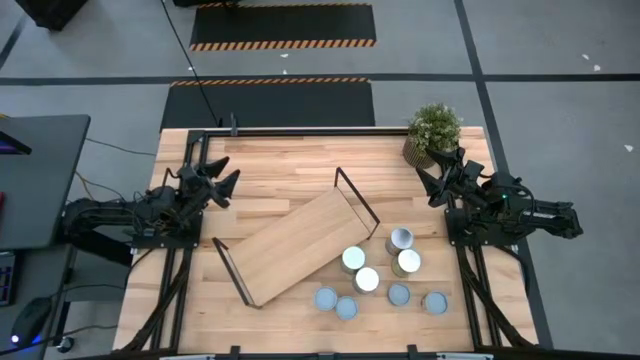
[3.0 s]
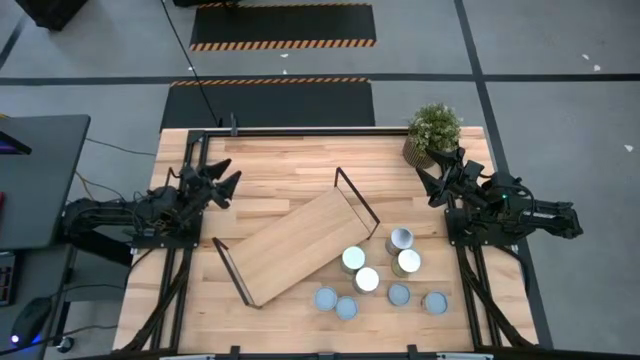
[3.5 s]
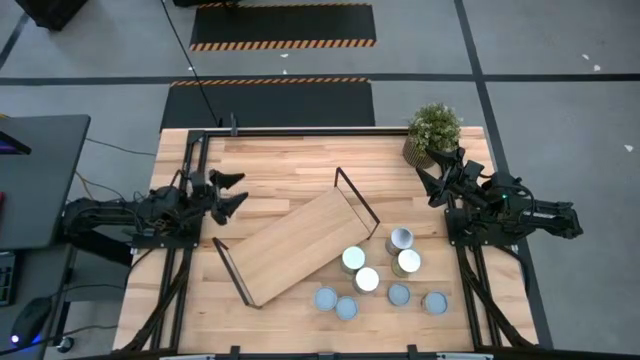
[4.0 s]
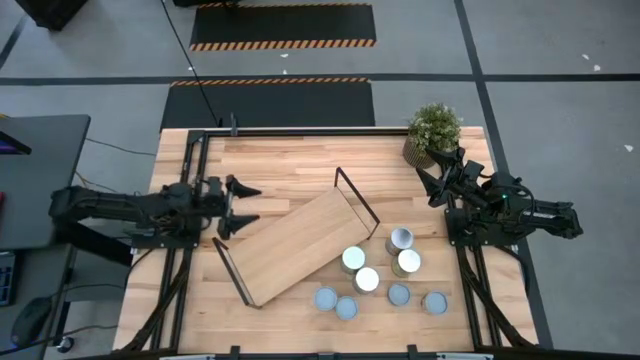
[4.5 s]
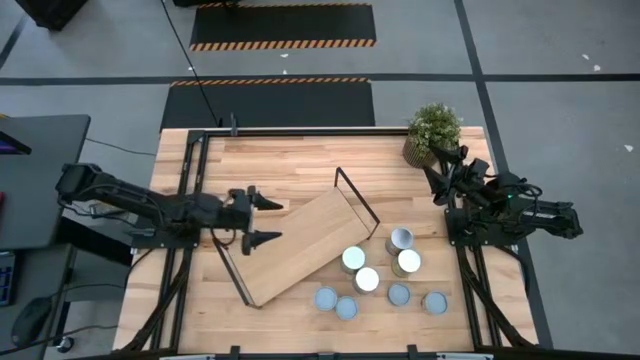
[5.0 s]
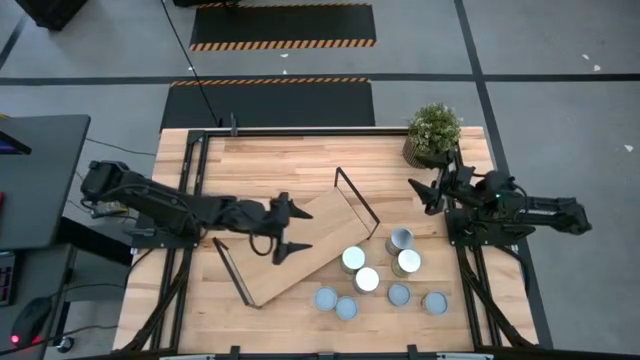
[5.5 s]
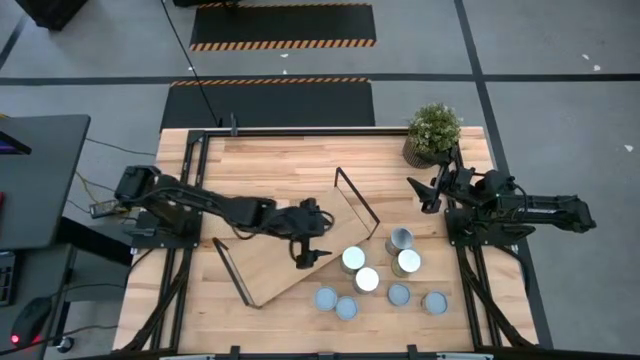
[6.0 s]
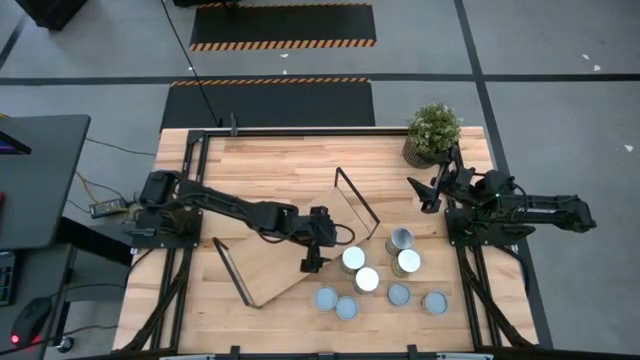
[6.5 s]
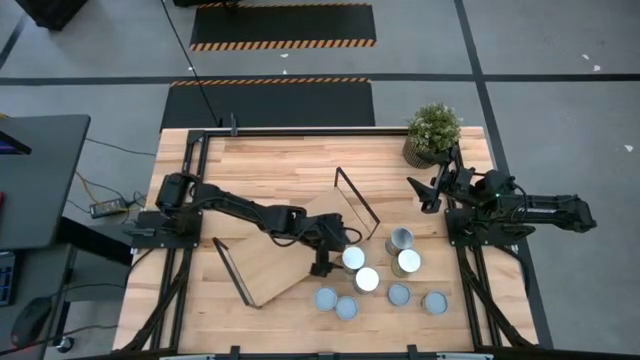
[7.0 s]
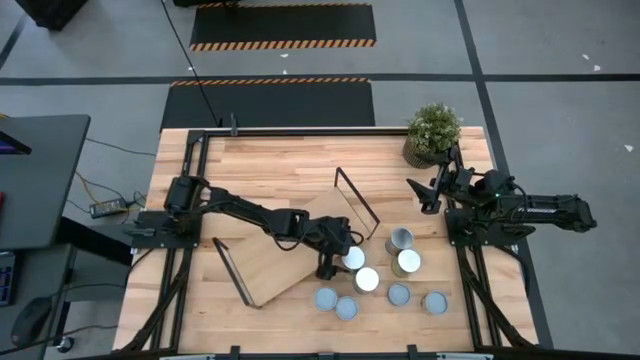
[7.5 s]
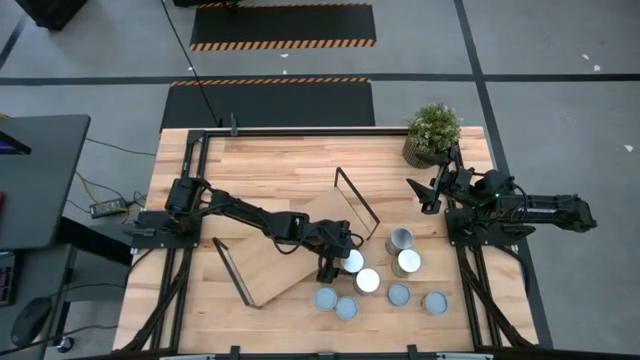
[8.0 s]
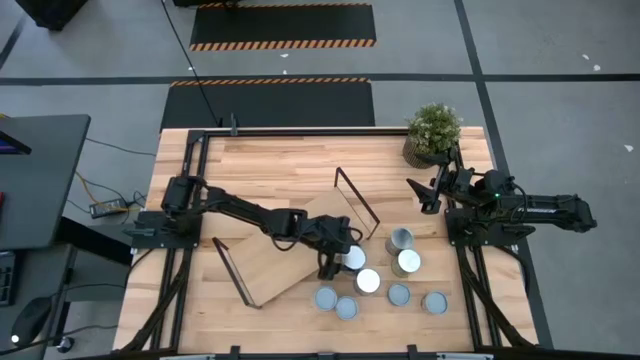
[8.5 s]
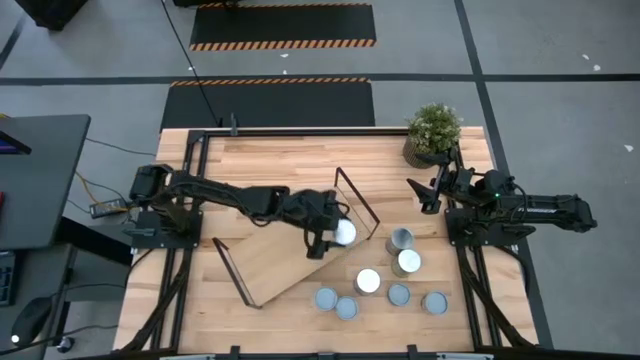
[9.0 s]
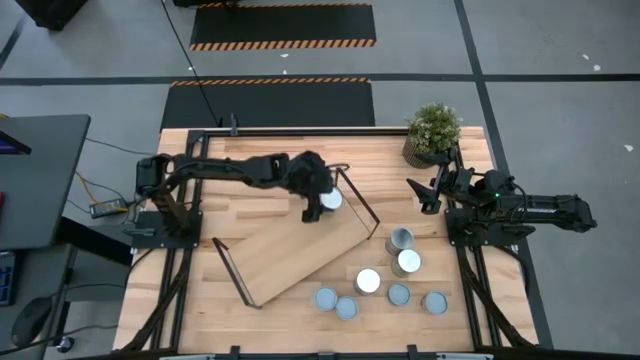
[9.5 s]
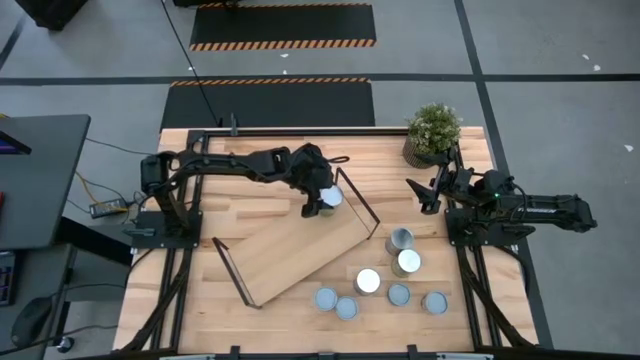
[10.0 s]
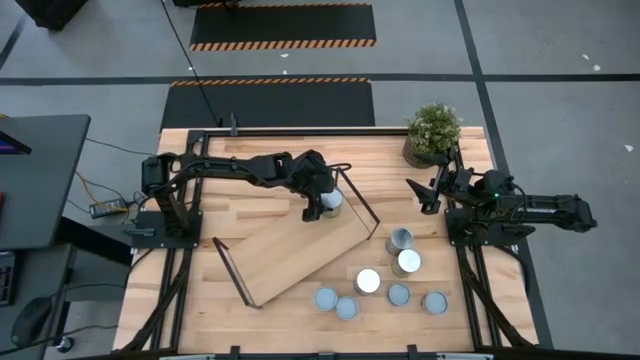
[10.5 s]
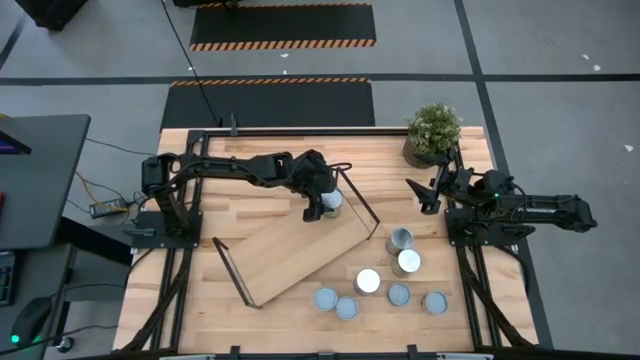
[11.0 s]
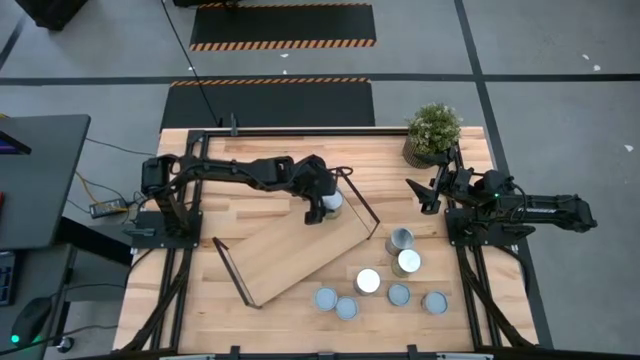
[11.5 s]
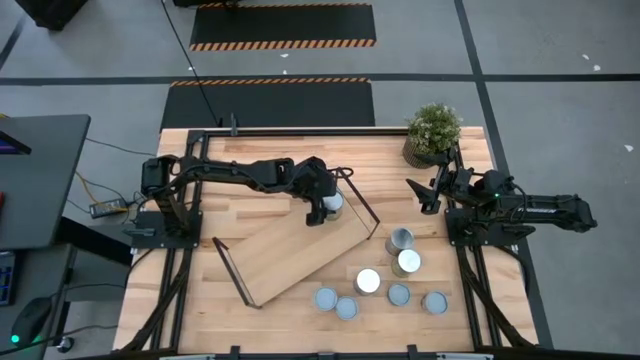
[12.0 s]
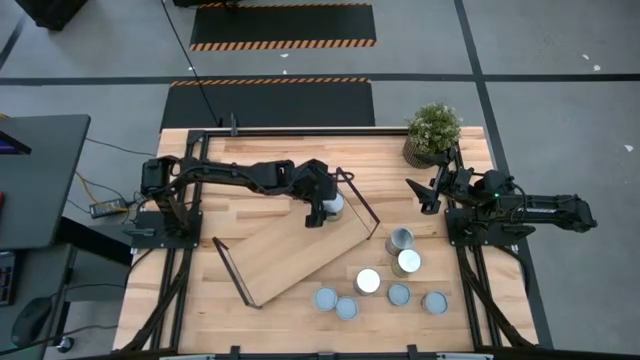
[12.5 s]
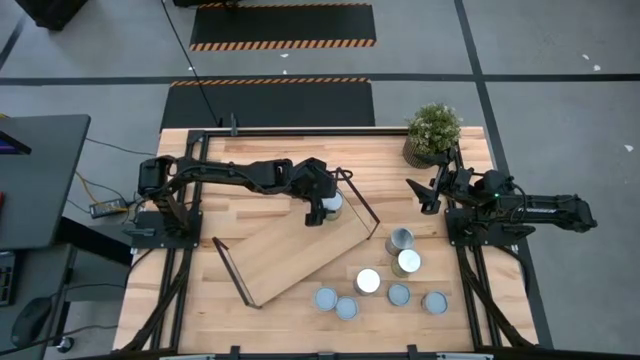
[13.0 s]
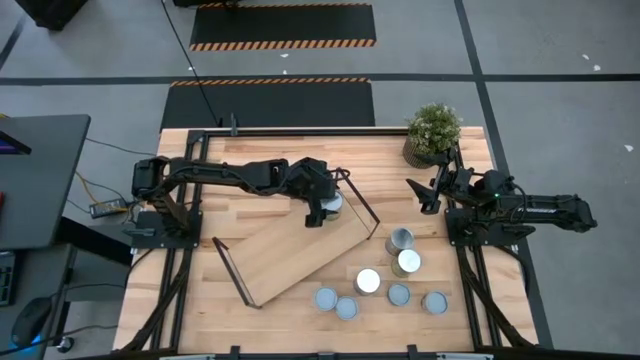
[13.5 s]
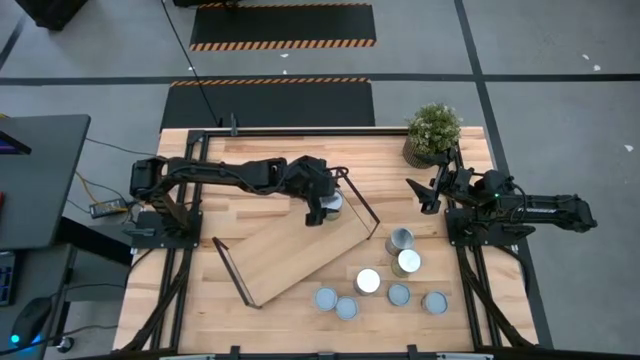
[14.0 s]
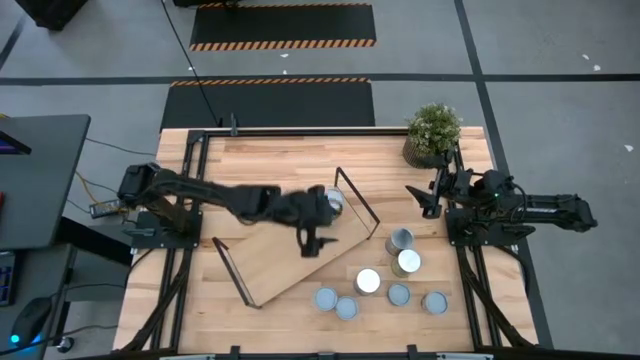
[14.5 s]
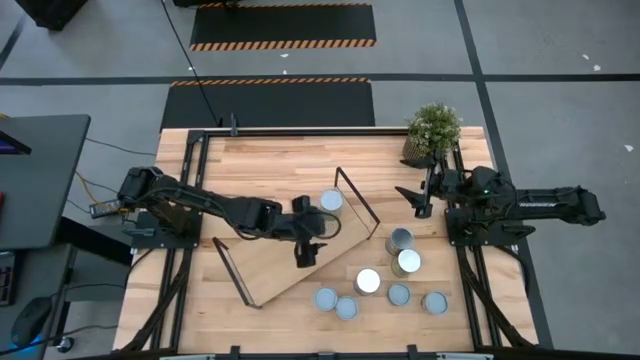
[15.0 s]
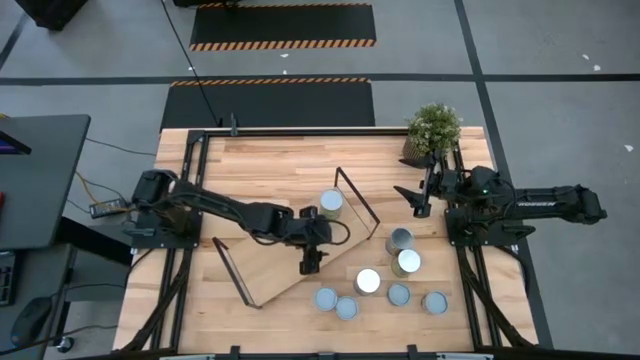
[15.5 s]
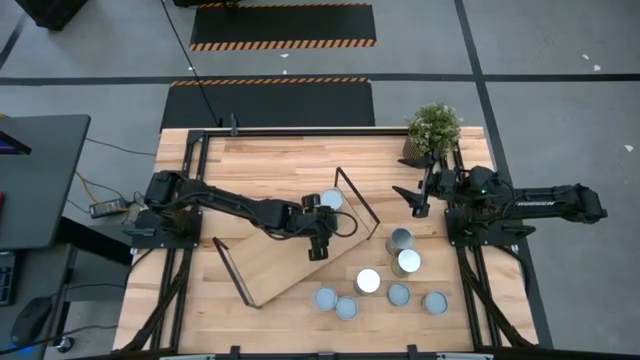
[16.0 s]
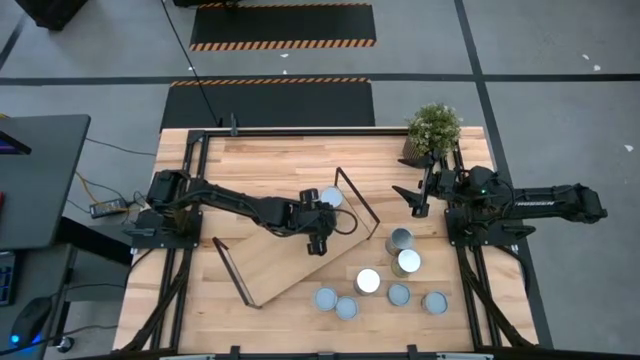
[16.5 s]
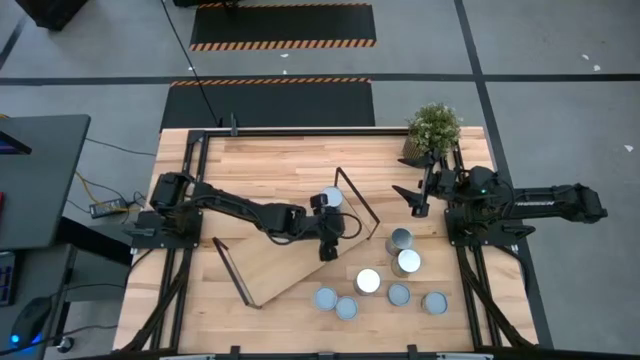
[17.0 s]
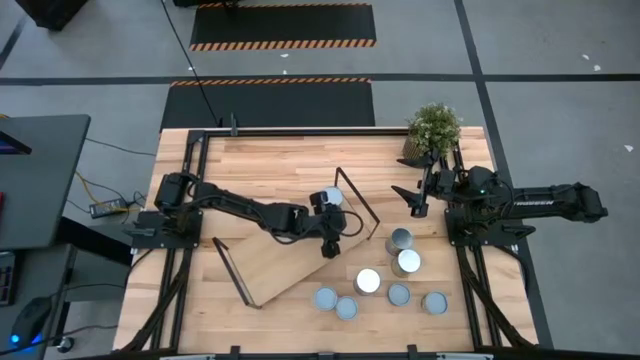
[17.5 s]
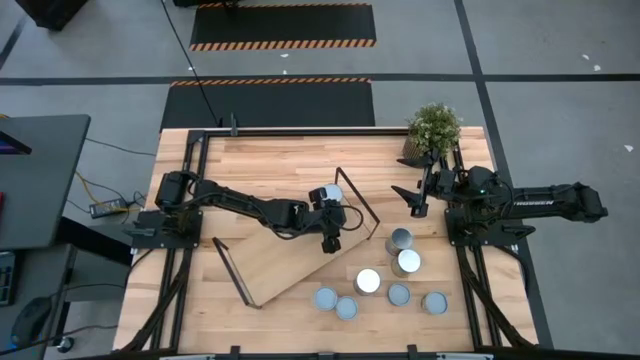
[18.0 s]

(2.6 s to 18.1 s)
Task: Pick and place cans onto a shelf
Put the top left big can on the shelf

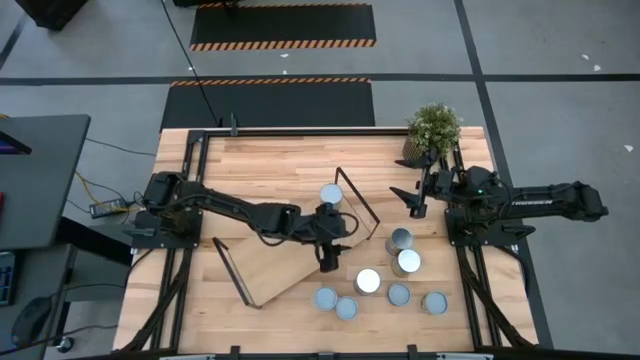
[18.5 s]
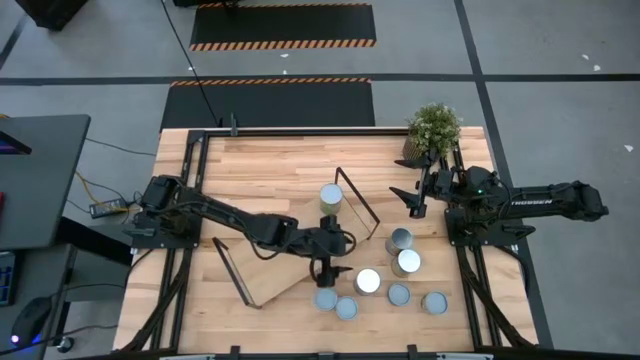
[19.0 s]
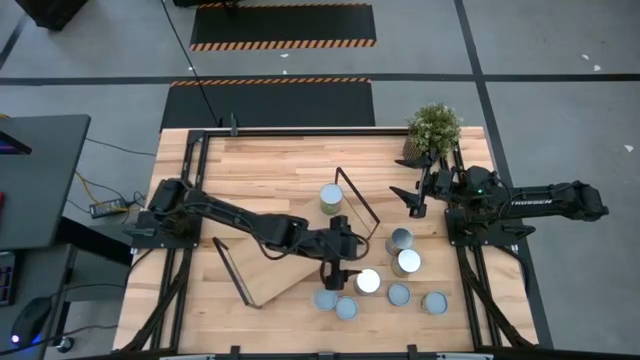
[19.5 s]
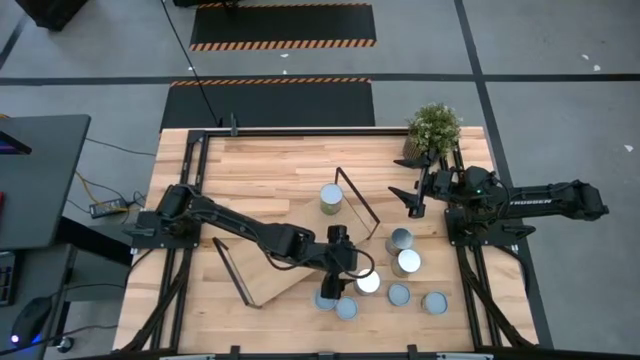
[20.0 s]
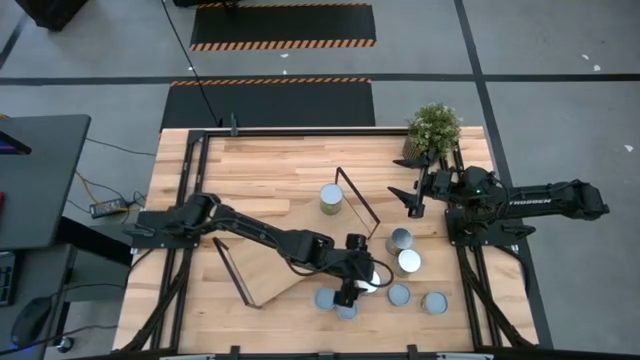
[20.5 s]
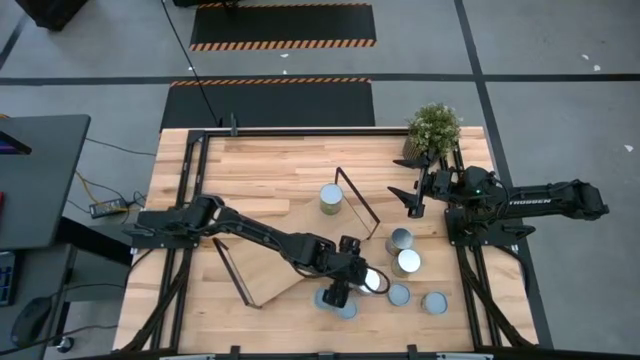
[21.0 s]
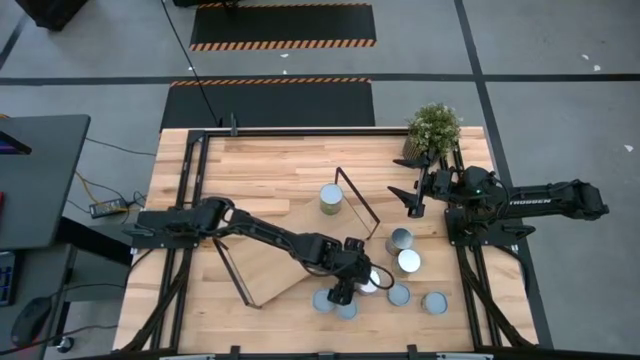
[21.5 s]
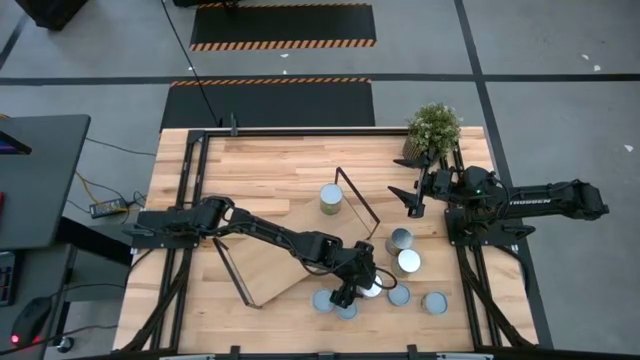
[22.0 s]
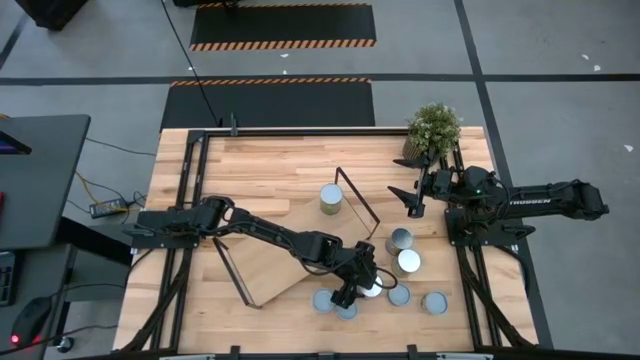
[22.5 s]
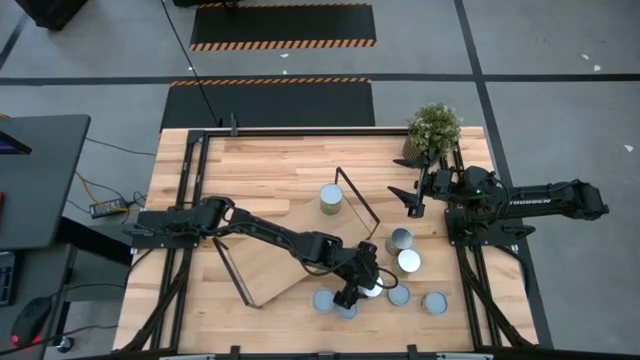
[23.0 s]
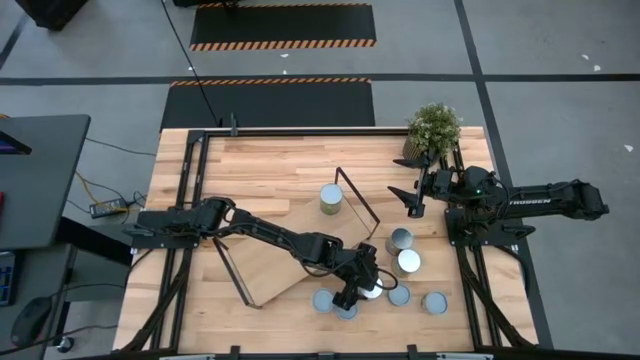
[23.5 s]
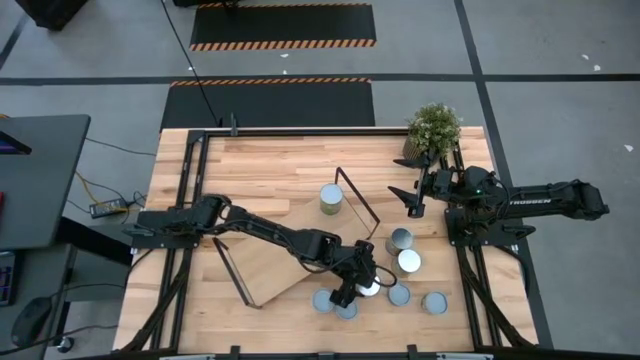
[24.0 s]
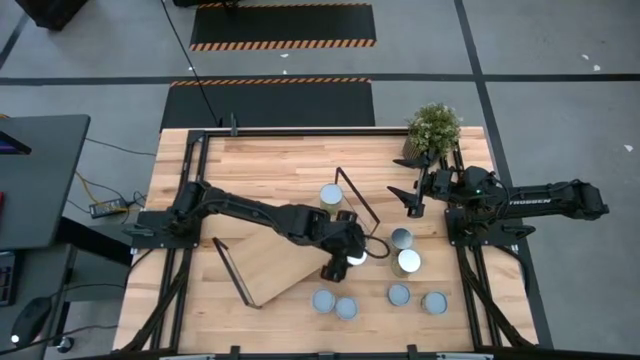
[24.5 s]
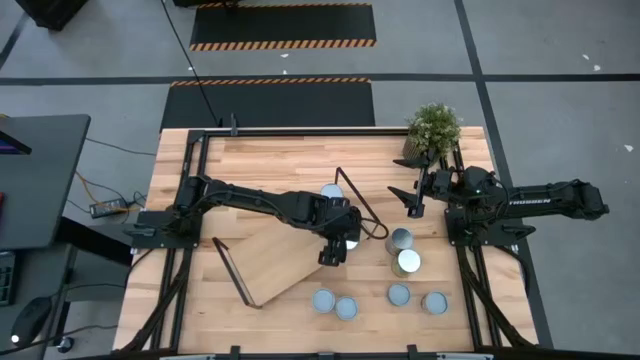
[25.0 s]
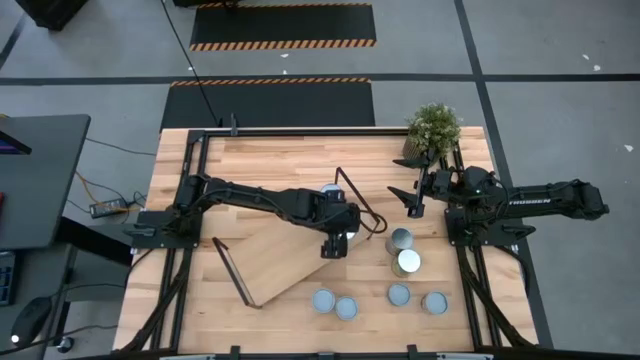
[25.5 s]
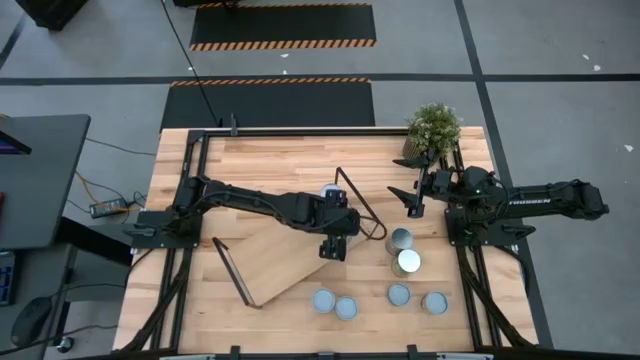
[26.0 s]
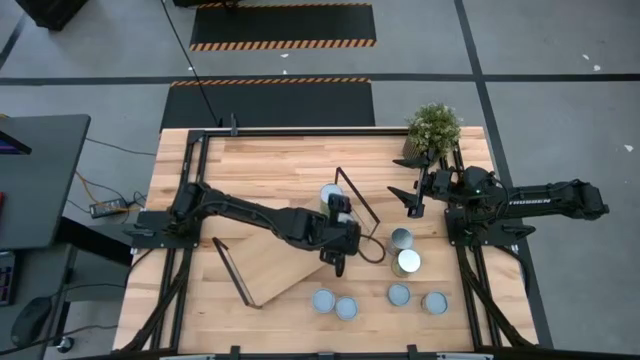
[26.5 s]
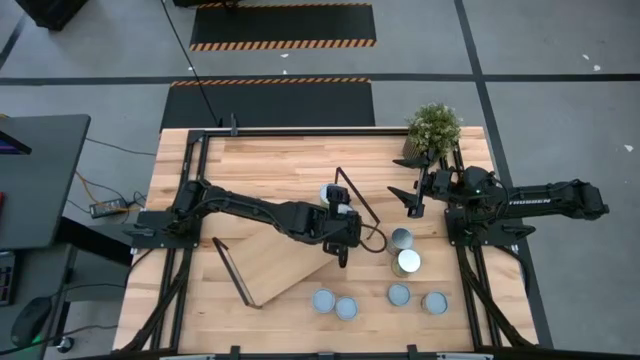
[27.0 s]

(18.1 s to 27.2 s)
Put the bottom left big can on the shelf
